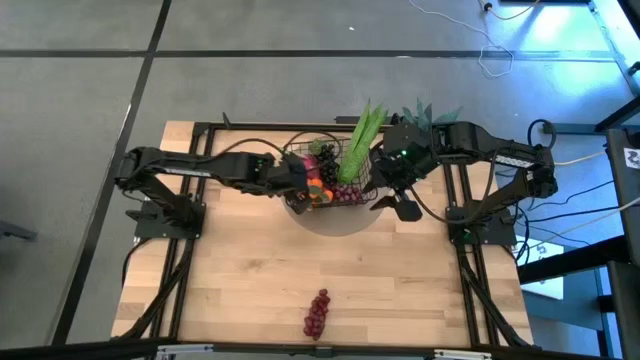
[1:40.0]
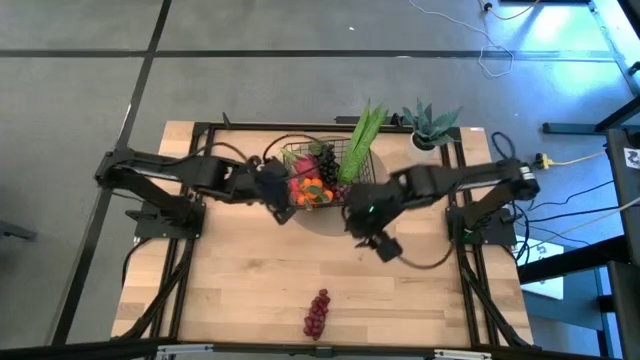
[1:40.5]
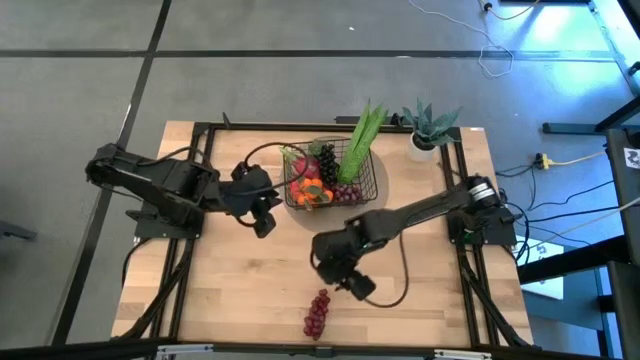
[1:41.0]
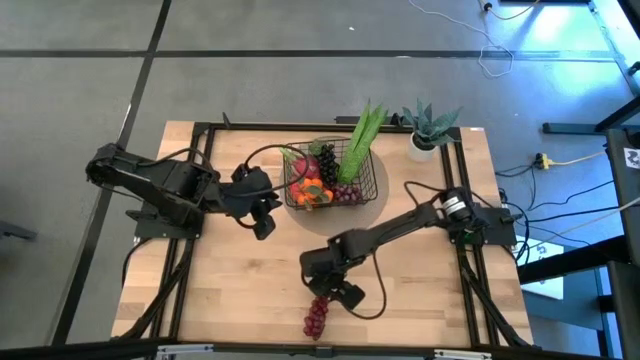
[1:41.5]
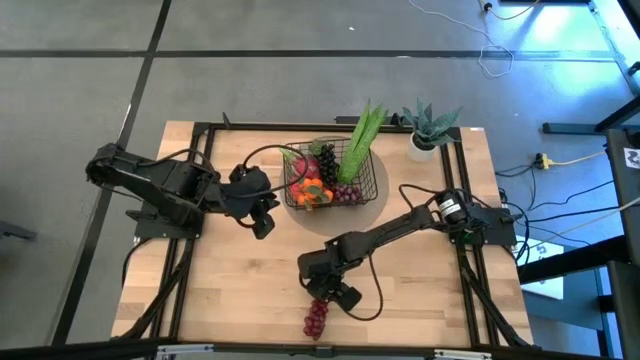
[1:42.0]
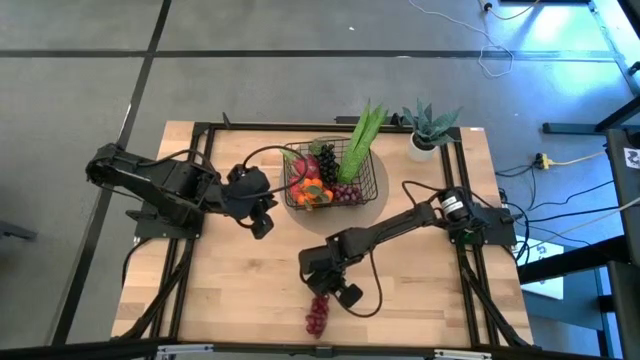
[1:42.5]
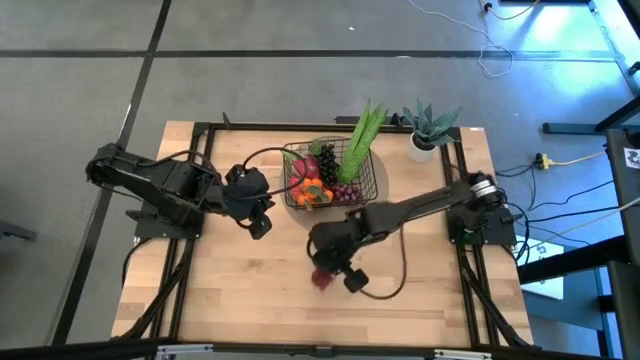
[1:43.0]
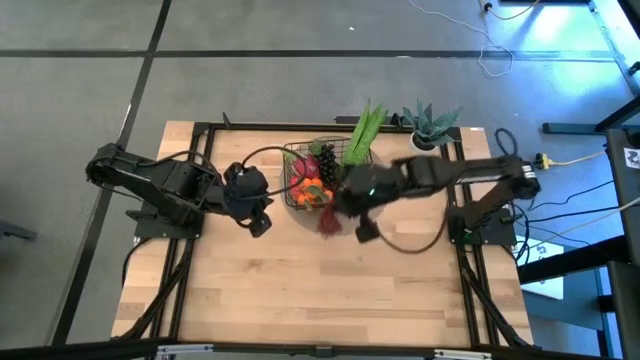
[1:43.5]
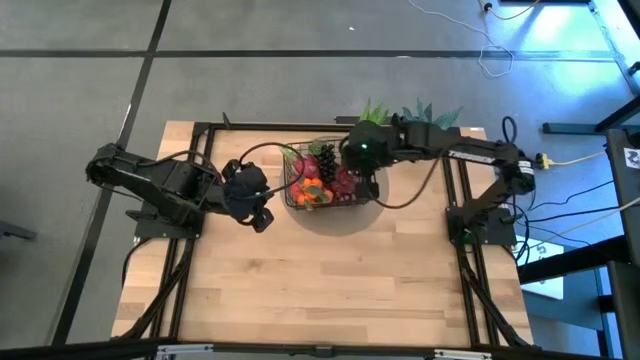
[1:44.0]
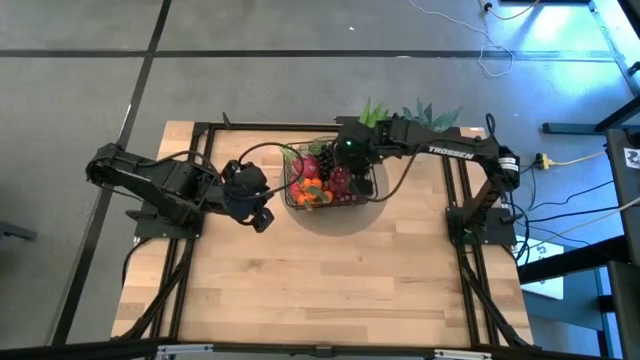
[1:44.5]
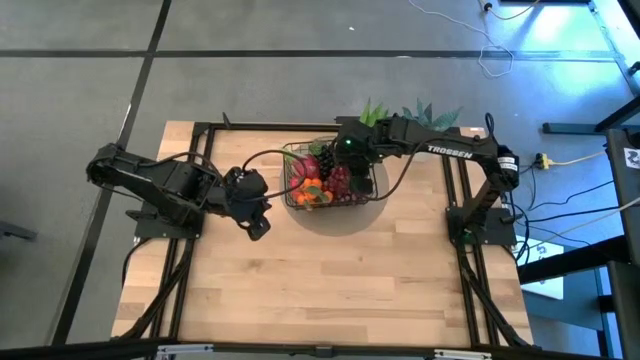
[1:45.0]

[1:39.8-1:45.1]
Task: Build produce basket
Put the red grapes into the wire basket

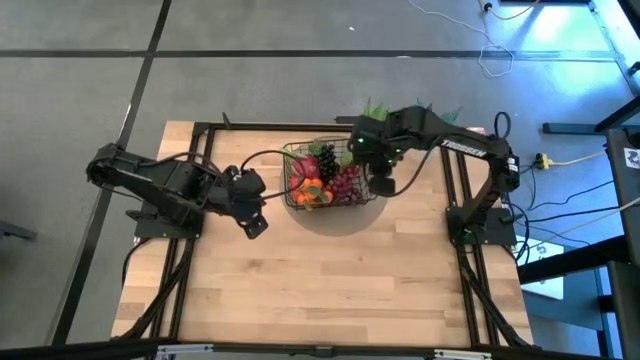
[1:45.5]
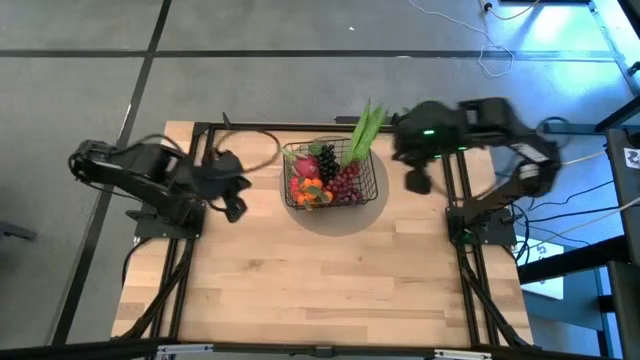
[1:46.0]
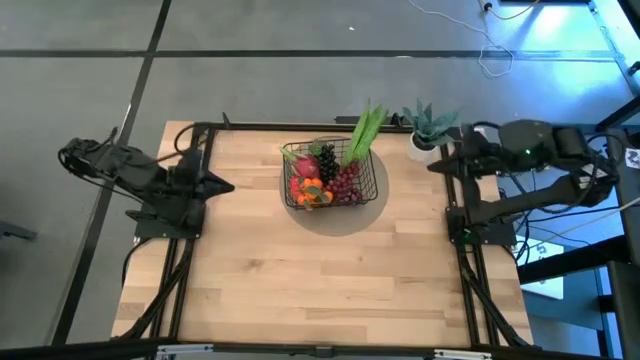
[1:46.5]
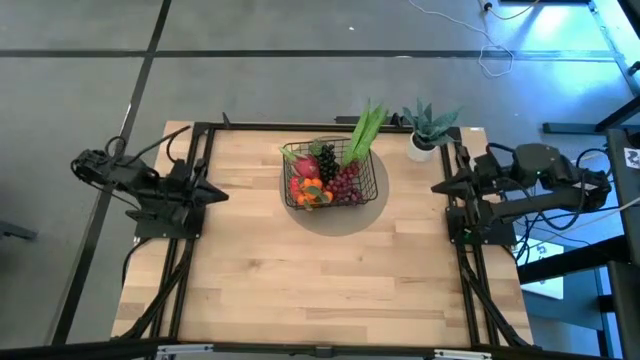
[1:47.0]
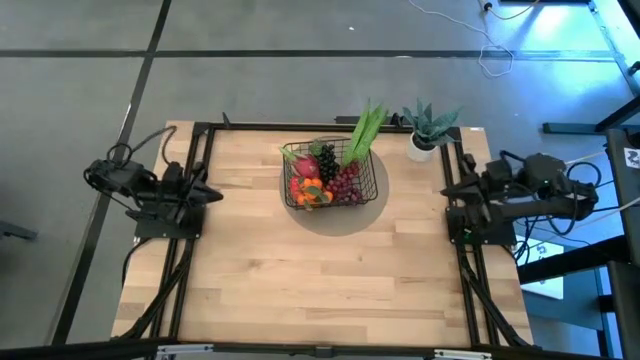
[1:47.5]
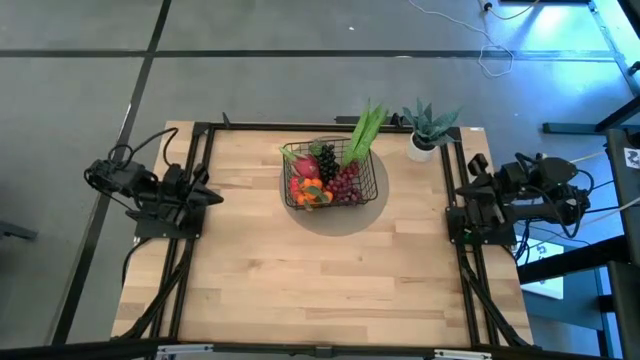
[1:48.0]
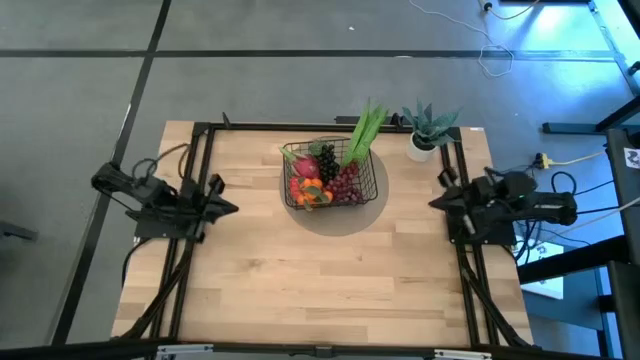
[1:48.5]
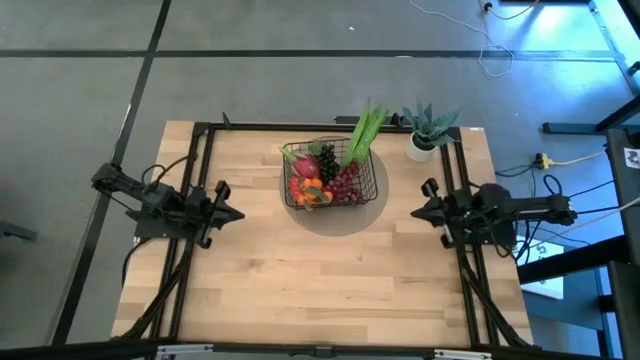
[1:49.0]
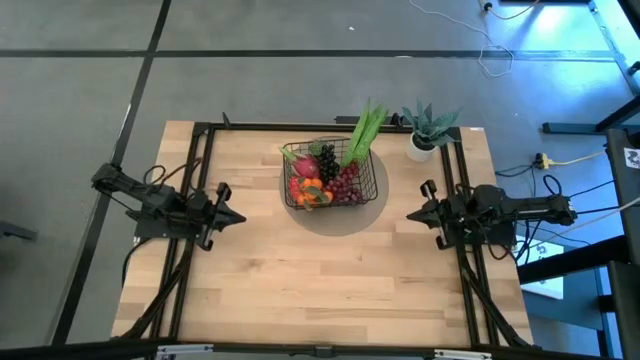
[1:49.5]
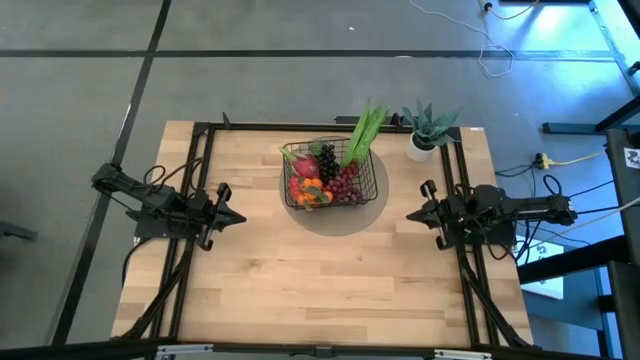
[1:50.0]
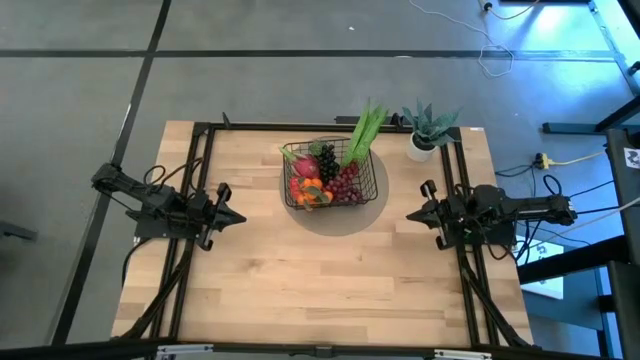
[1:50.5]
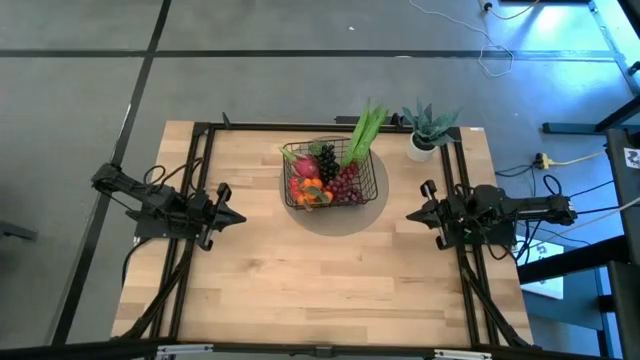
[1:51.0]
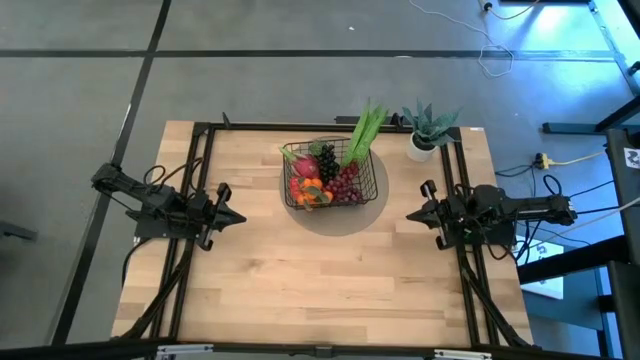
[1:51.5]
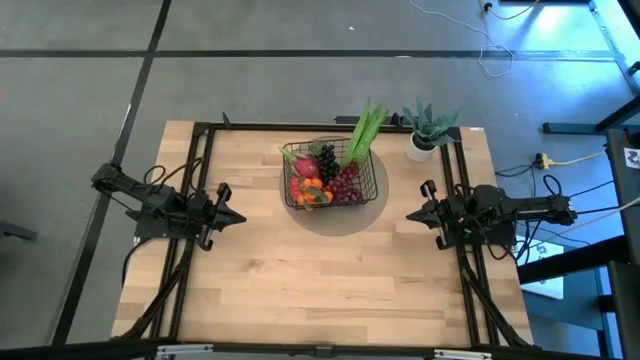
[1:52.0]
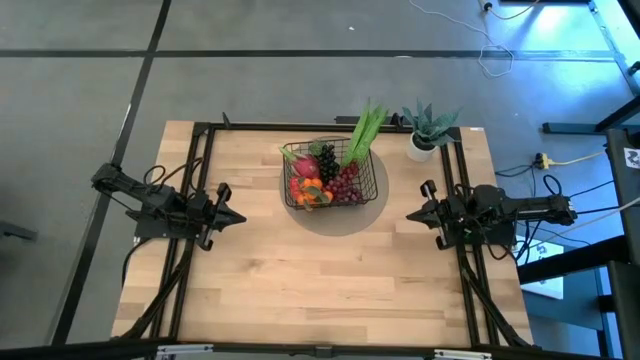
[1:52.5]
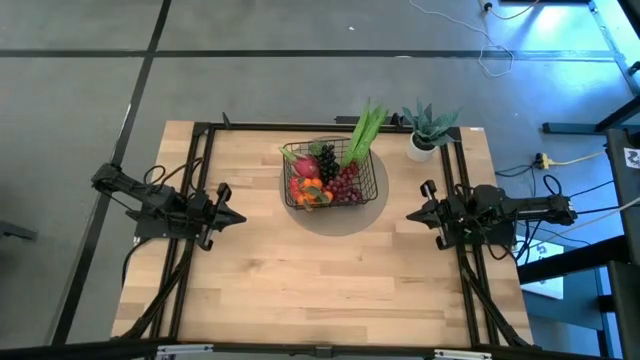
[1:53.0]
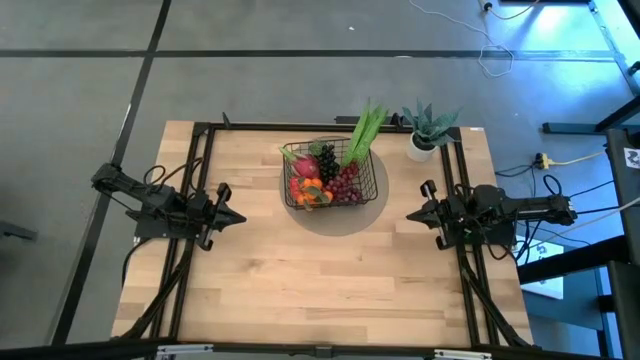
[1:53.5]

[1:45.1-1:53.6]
Return to Home Position

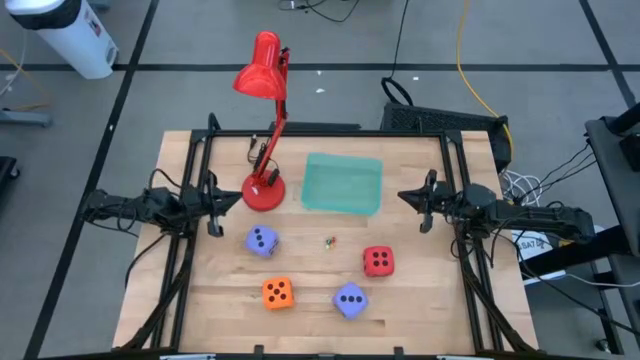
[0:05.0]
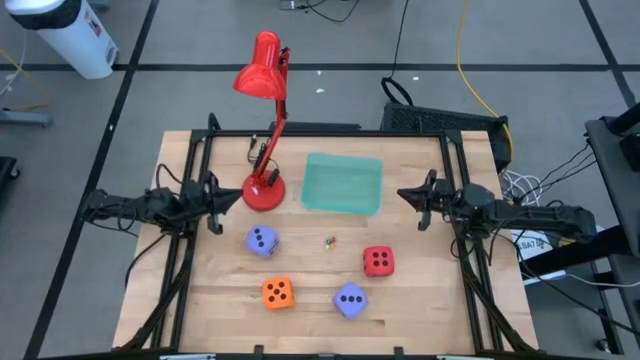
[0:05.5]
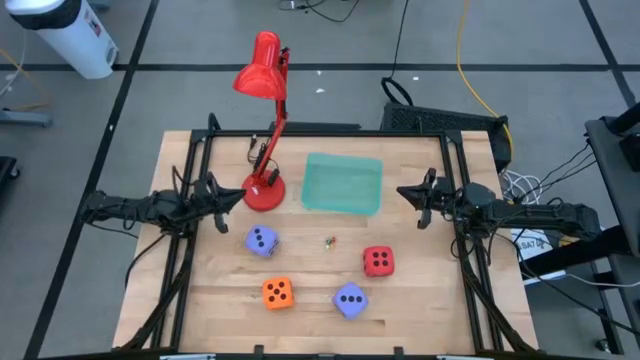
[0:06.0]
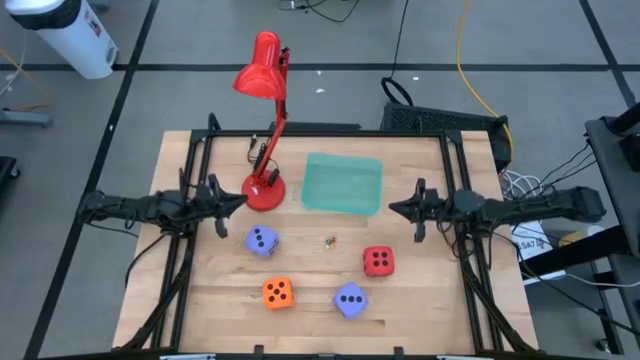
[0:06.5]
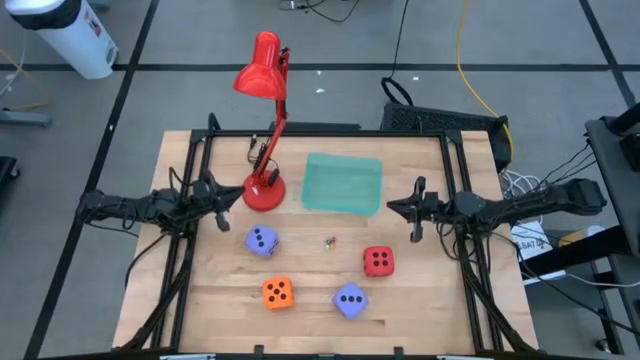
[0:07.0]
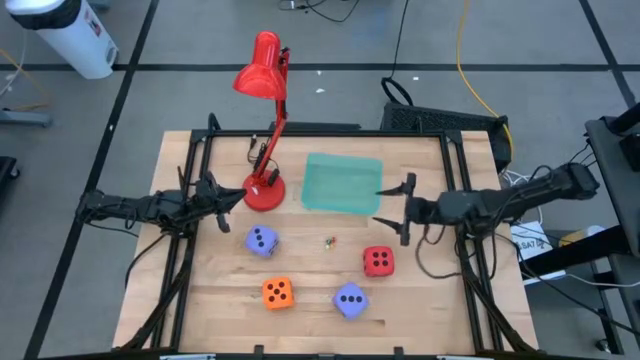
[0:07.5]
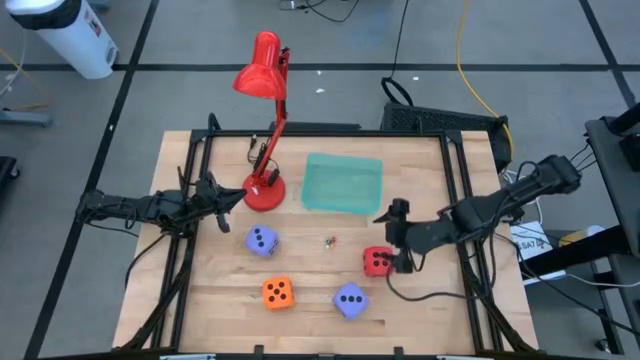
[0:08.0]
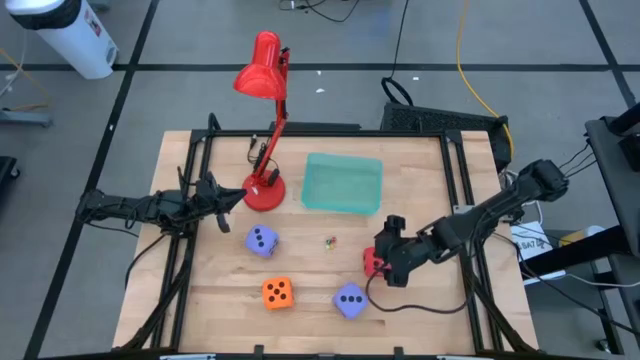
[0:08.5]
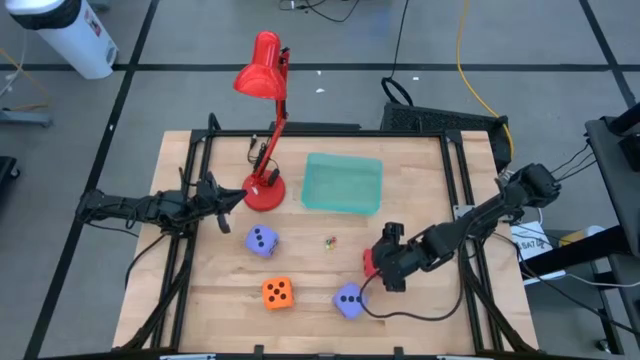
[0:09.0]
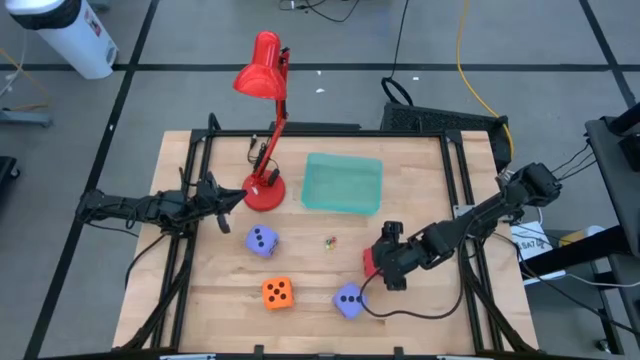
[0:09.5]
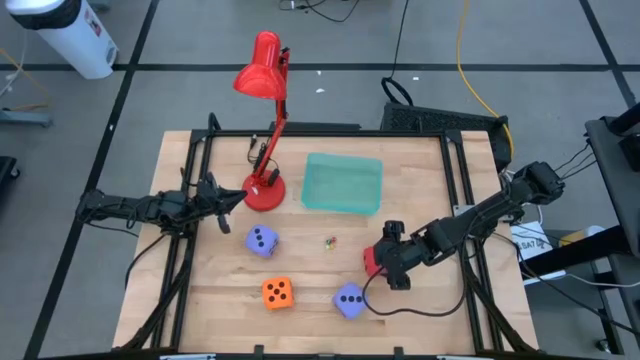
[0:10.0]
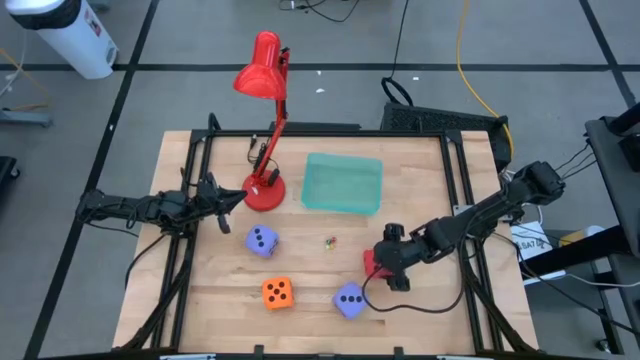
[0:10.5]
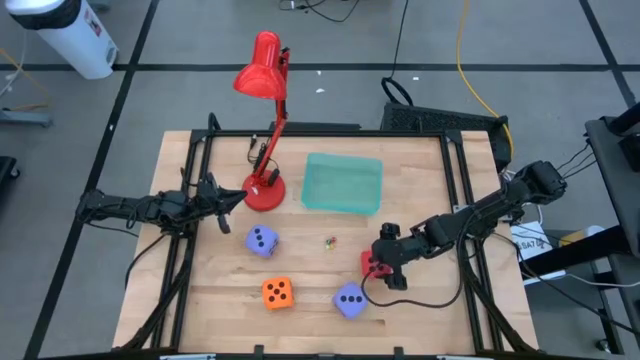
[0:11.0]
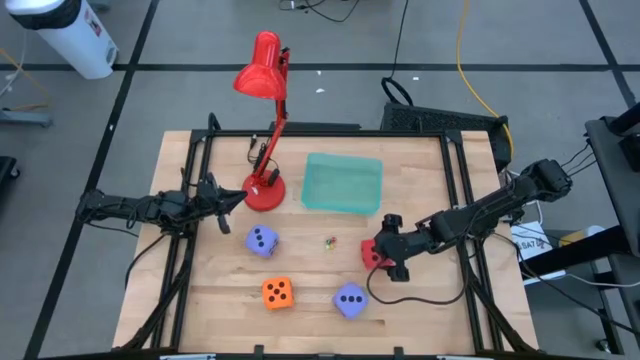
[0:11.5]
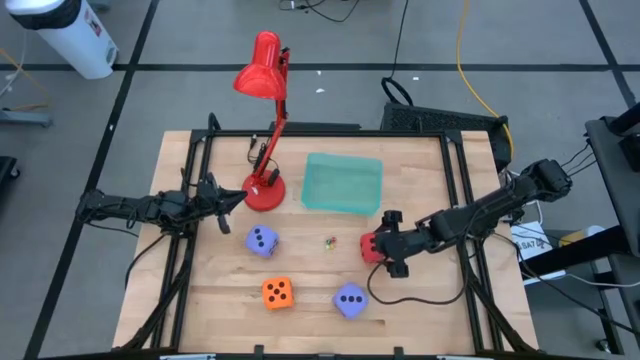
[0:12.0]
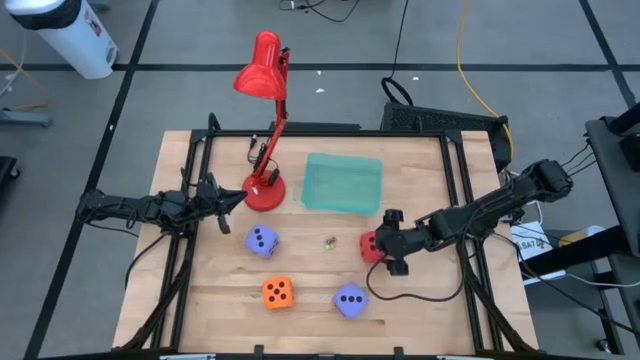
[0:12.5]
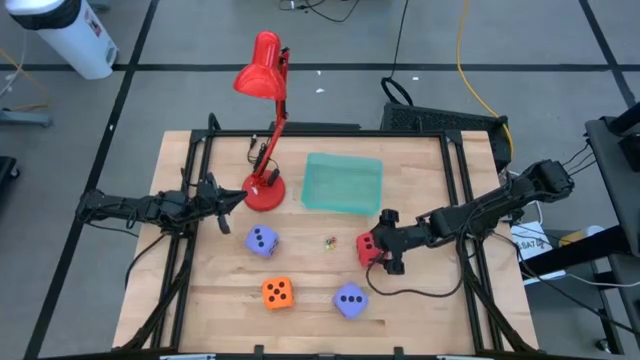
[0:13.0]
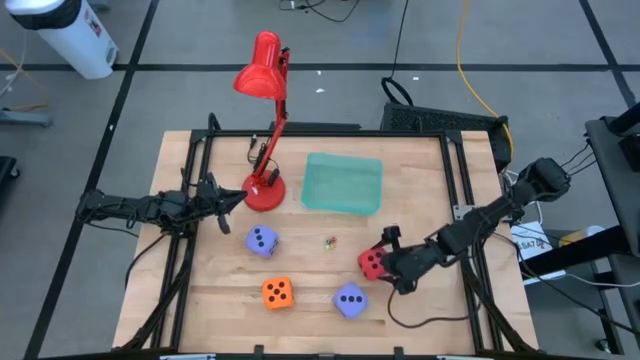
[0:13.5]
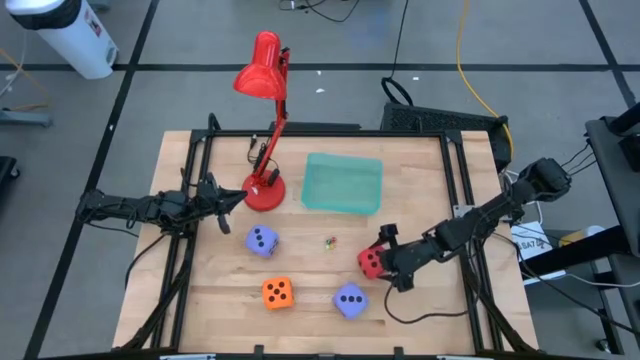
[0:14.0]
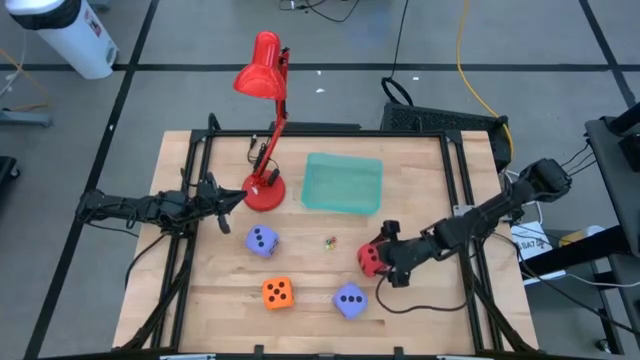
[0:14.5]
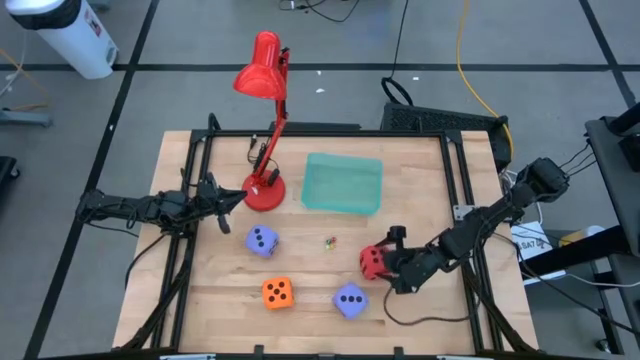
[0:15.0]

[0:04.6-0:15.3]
Task: Pick & Place Dice
Put the large red die into the blue bin
